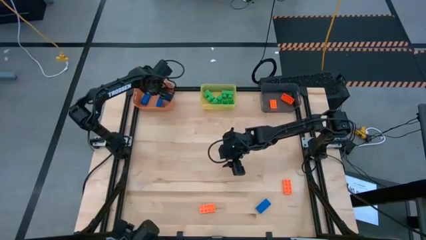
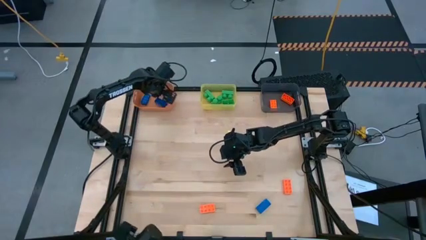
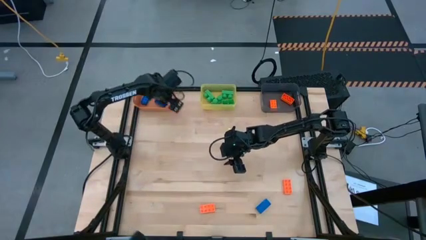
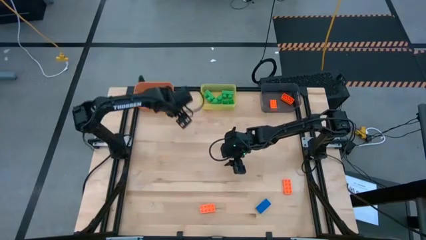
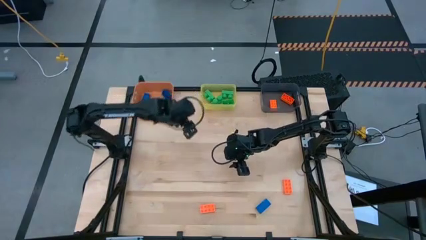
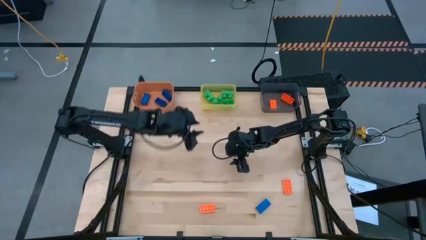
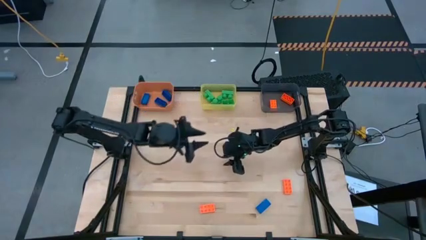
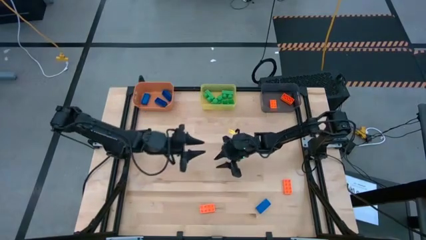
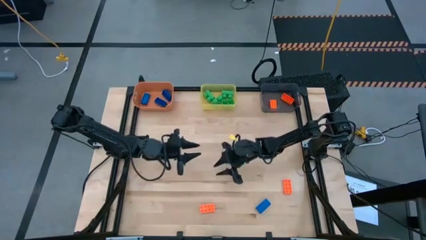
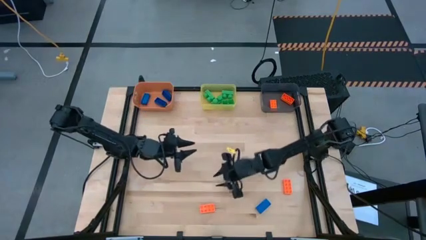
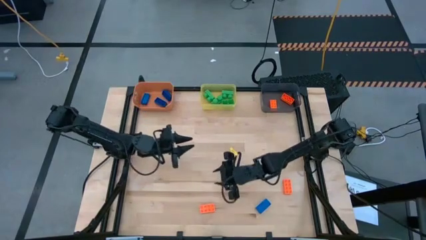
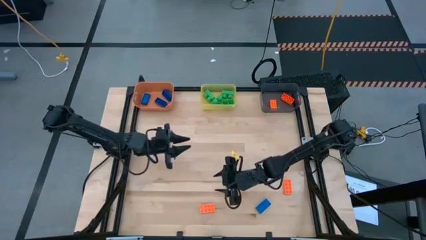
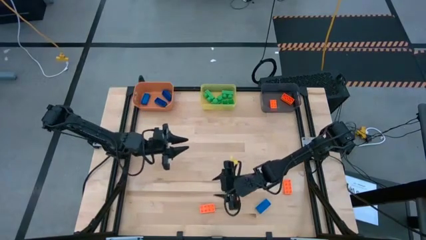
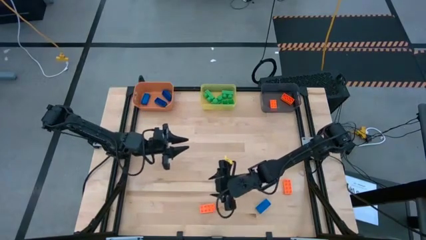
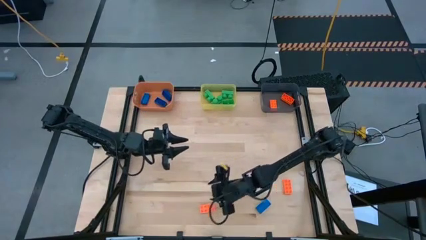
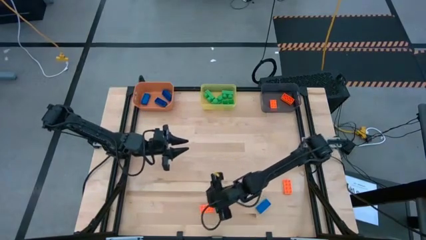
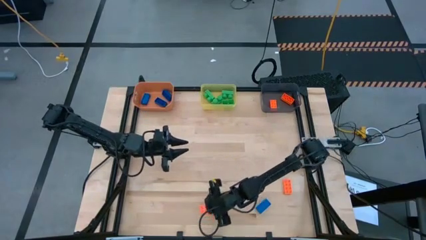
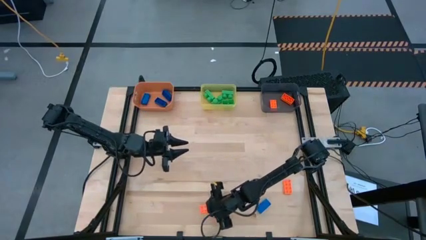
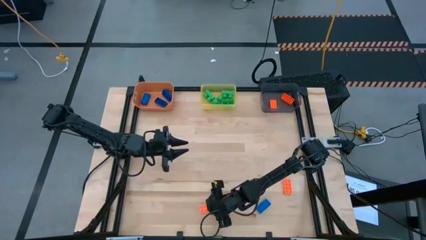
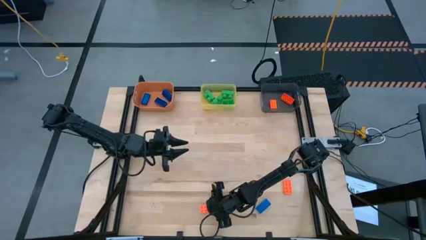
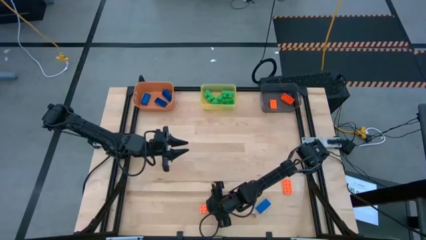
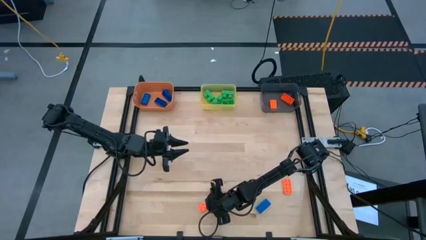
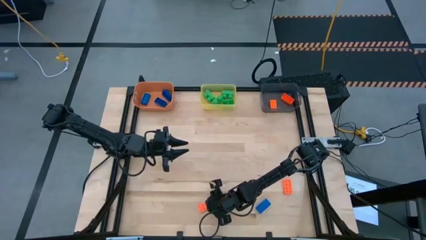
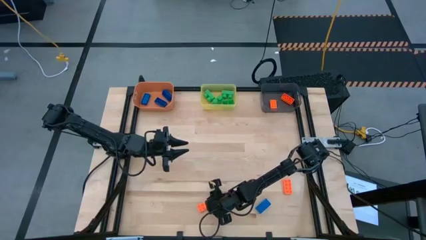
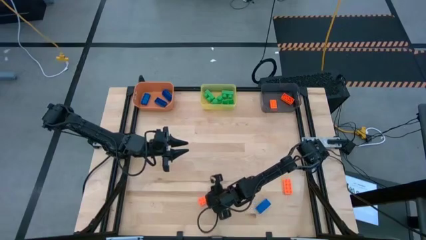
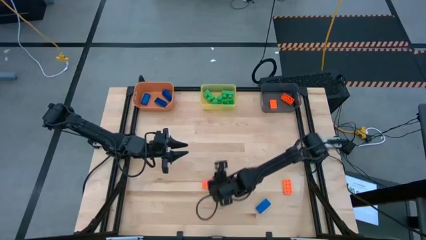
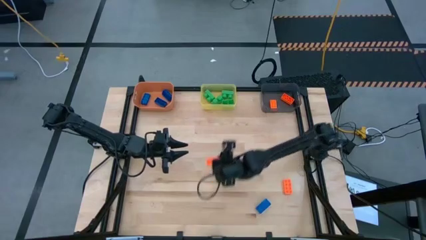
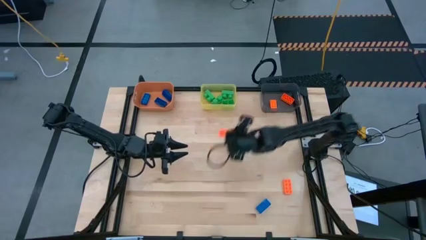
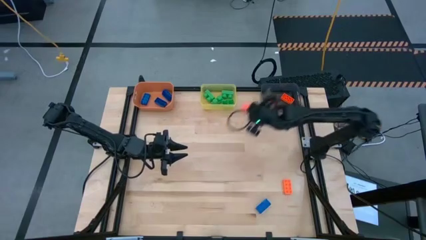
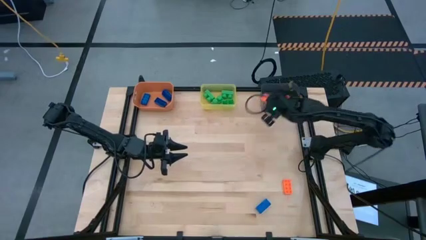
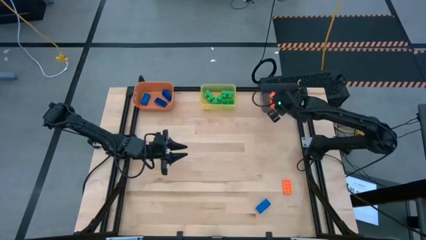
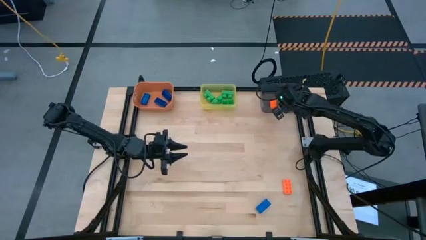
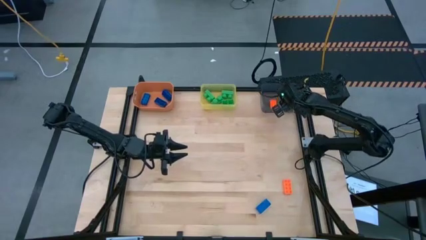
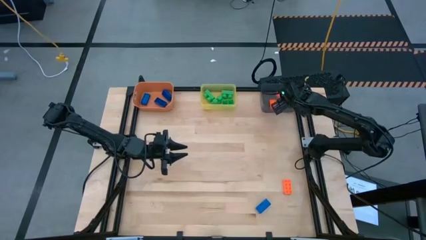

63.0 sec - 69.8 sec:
Task: Sort & place blocks by color
Put the orange game piece into the black bin

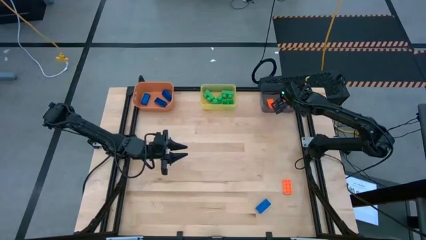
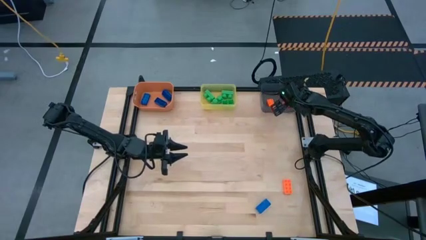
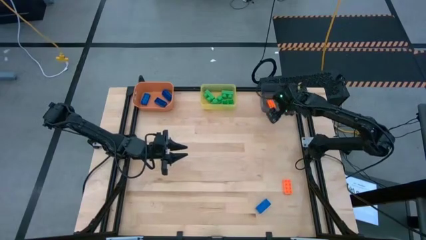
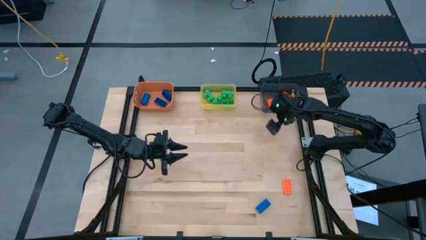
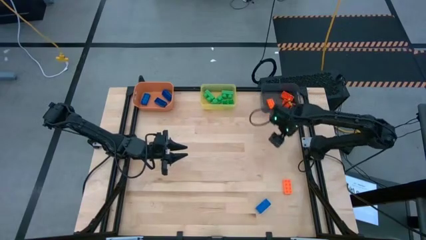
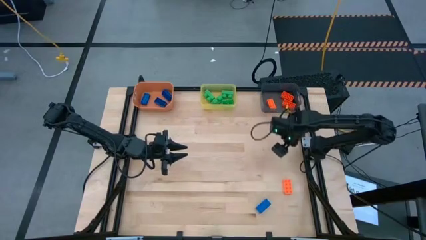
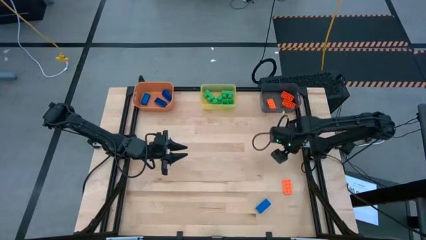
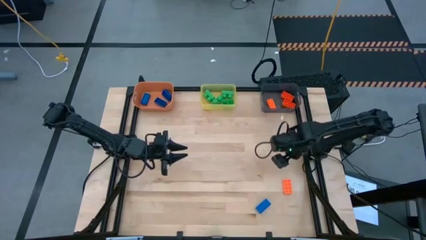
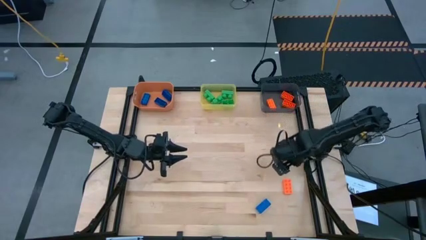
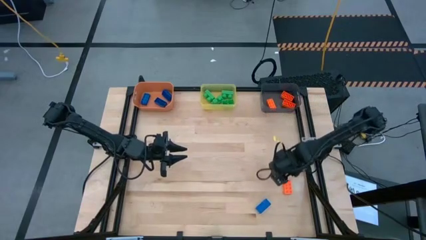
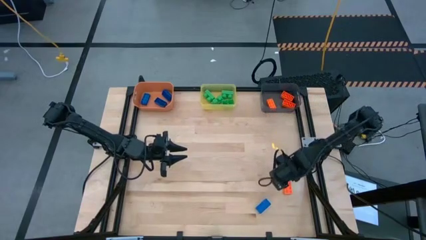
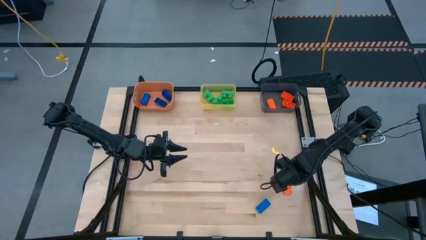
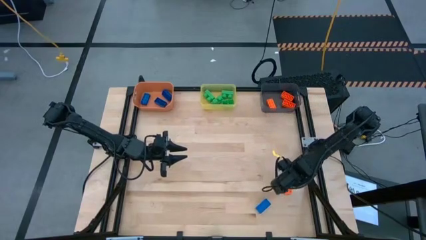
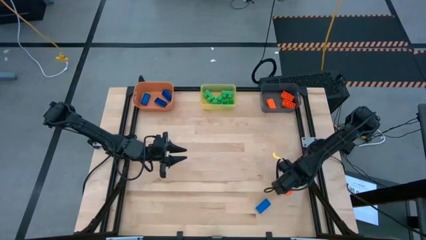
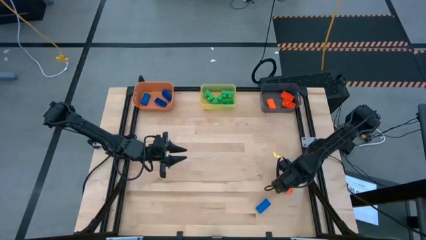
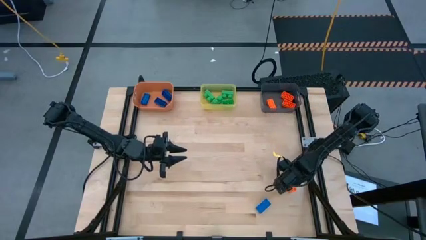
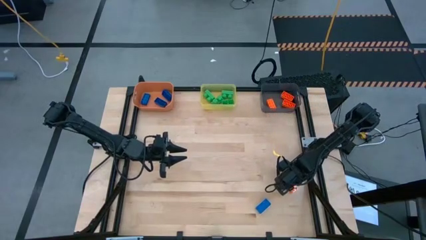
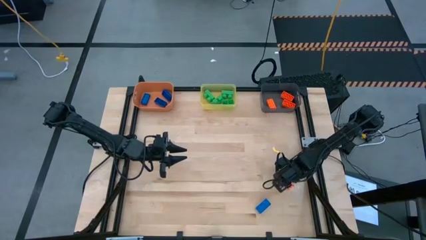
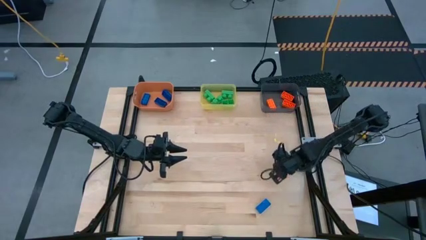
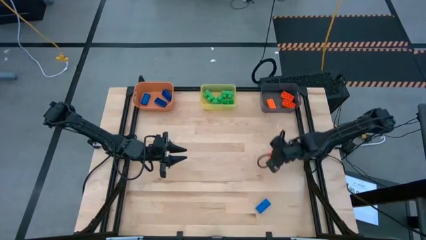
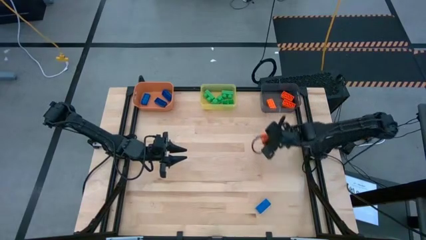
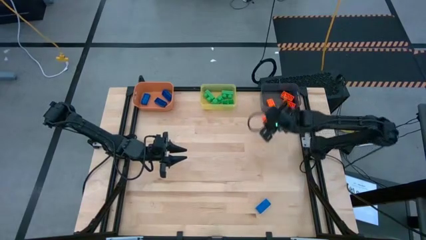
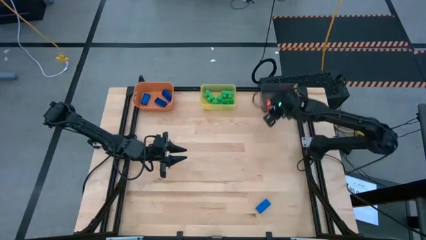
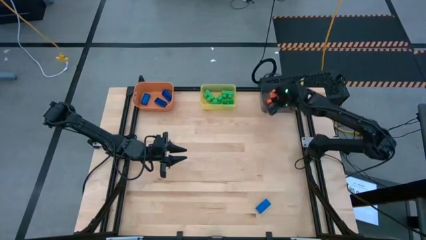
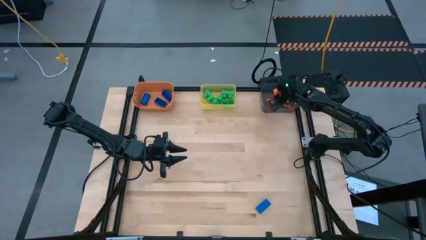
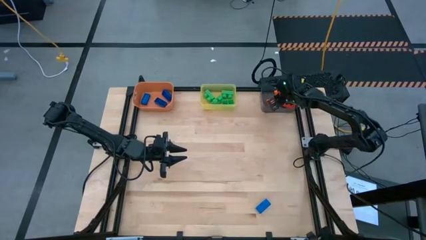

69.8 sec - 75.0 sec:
Put the orange game piece into the black bin

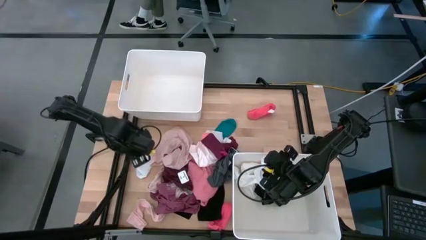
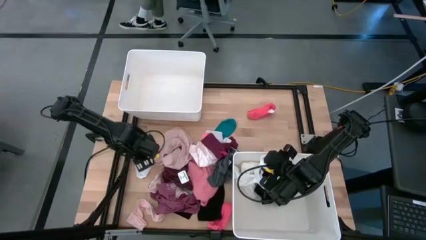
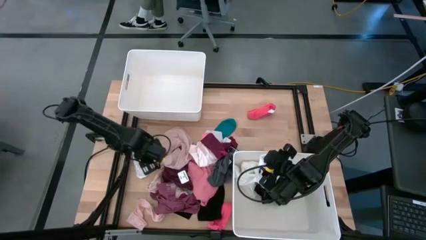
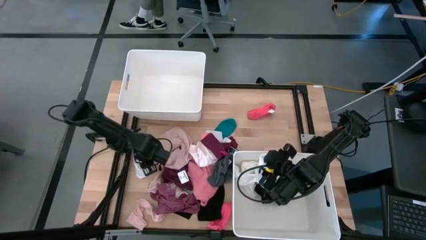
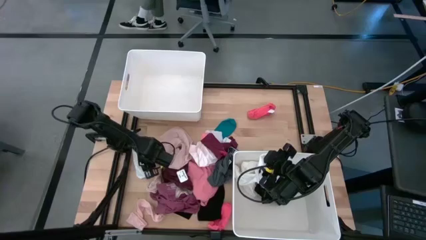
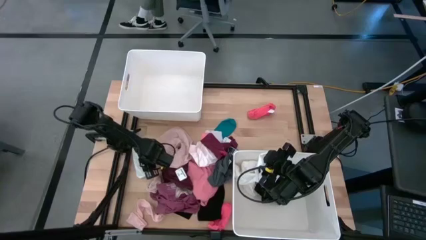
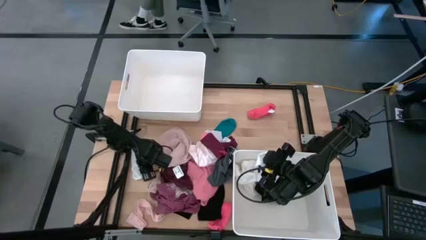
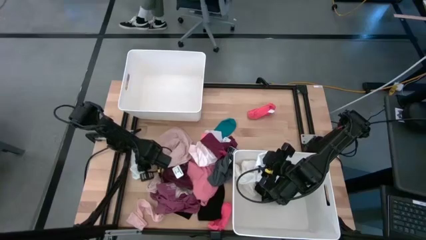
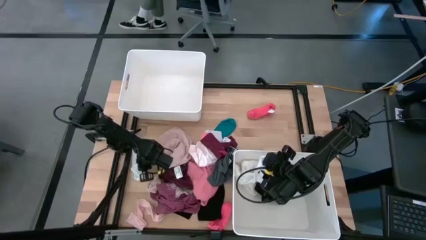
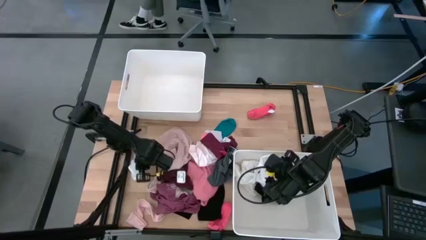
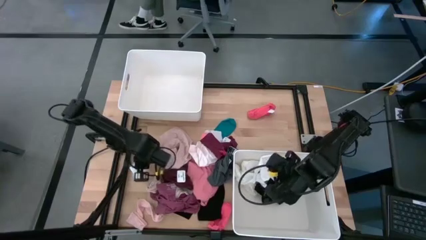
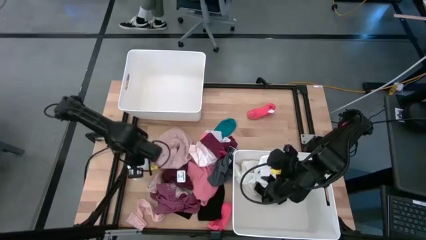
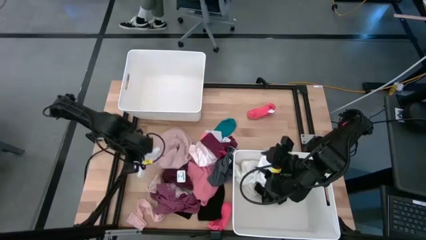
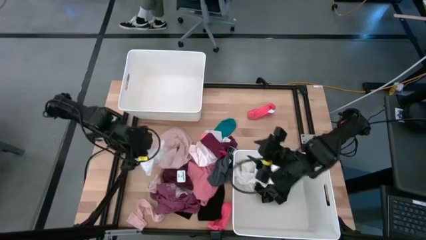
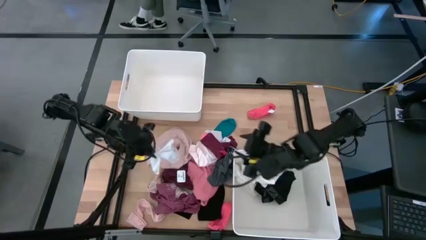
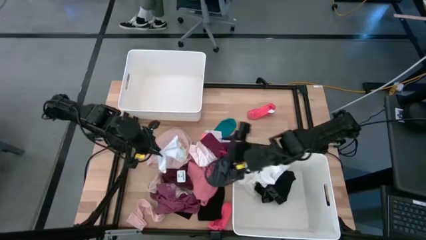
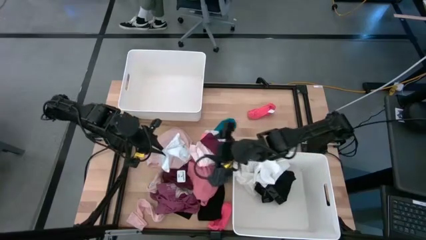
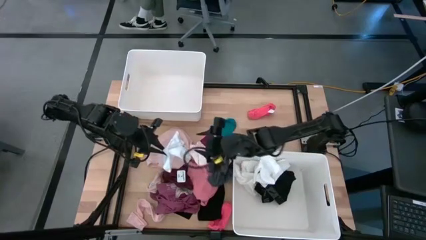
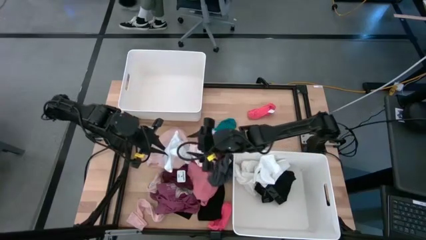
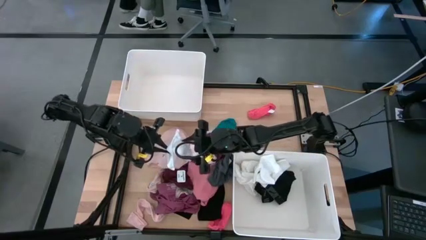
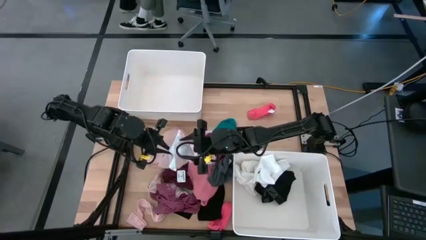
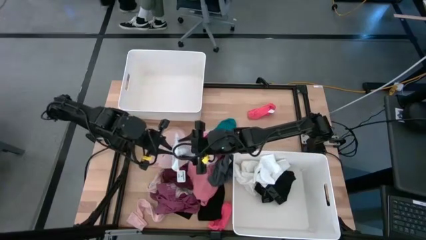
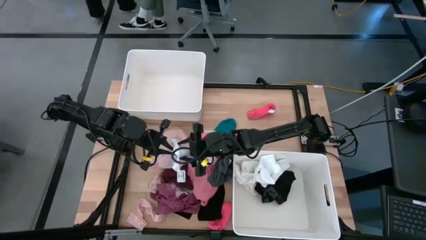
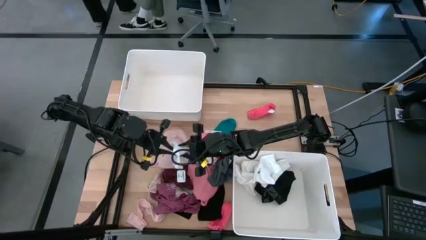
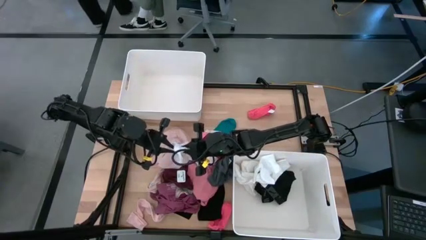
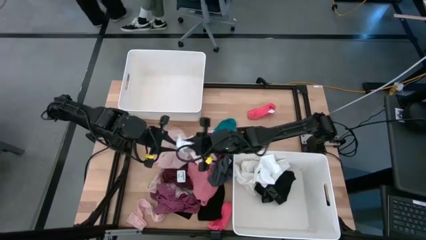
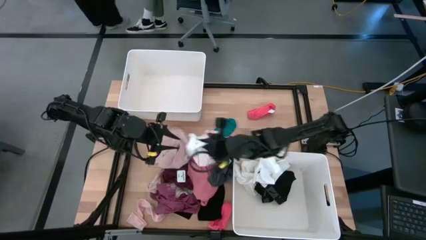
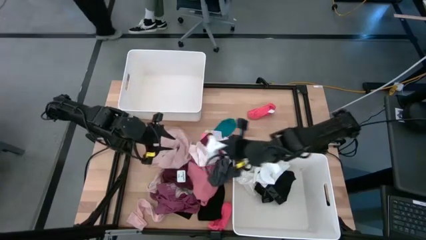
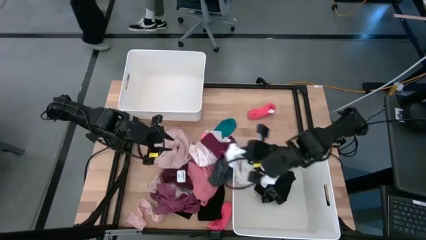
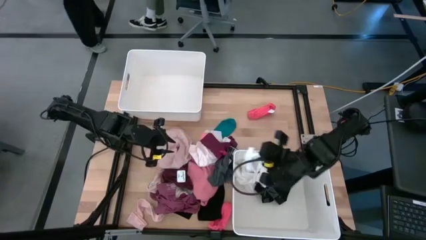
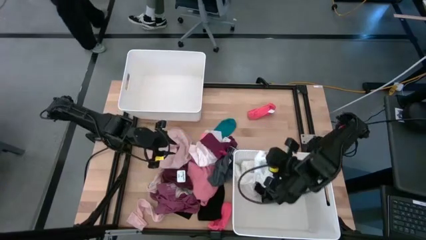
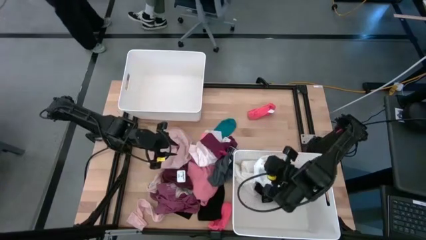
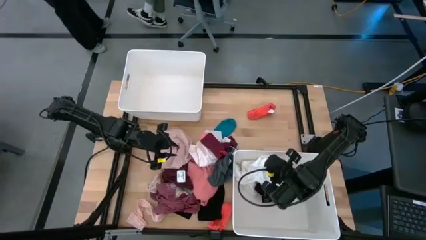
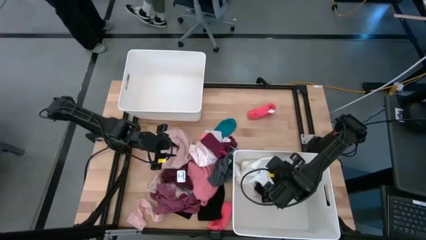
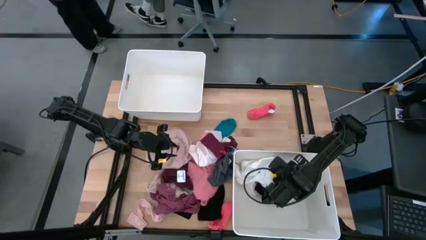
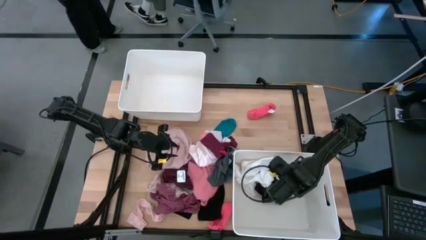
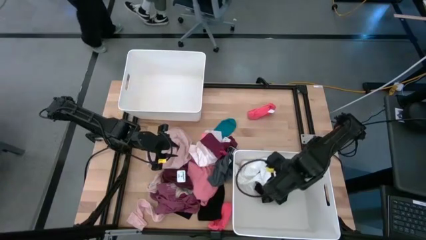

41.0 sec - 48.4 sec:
Task: Sort clothes
Put the white sock into the bottom white bin
